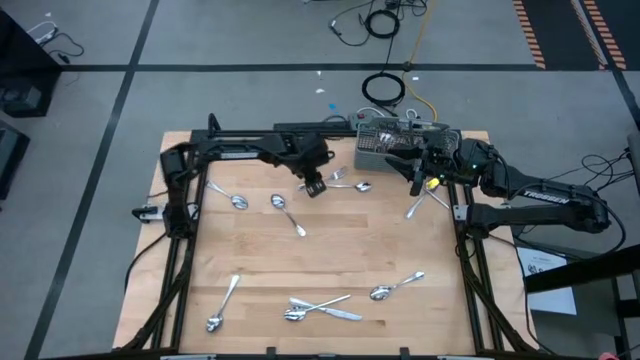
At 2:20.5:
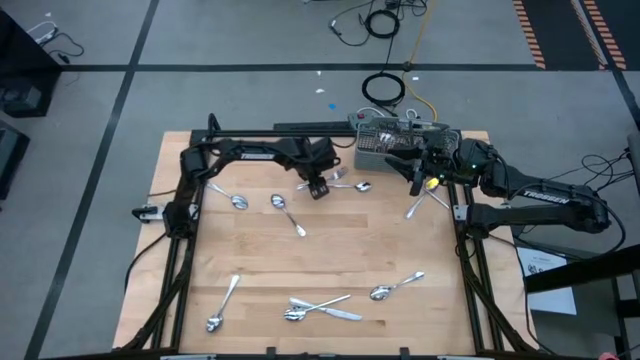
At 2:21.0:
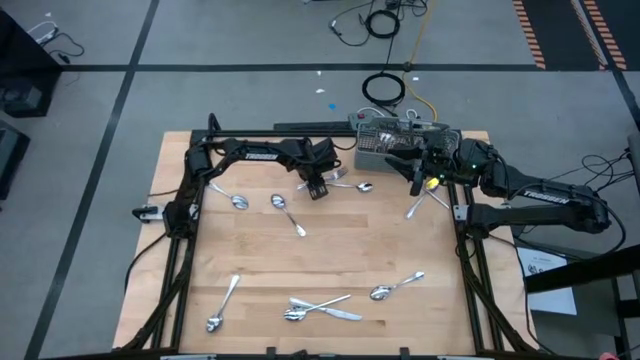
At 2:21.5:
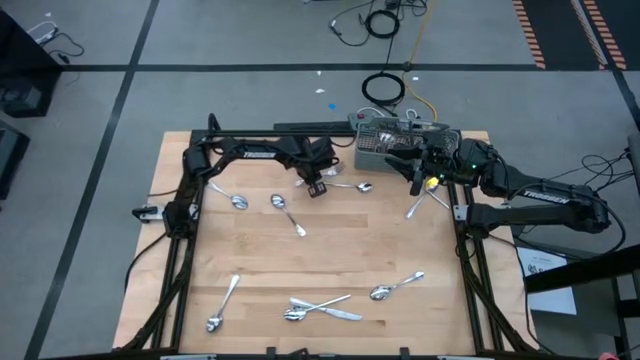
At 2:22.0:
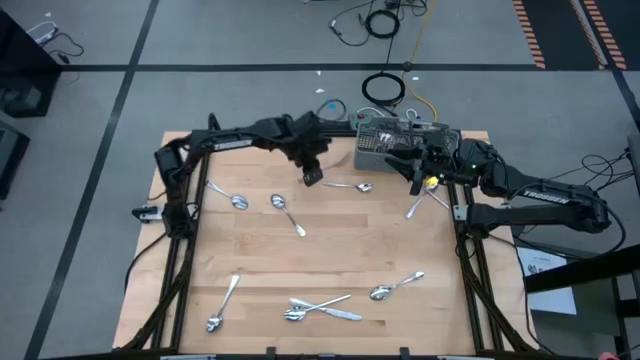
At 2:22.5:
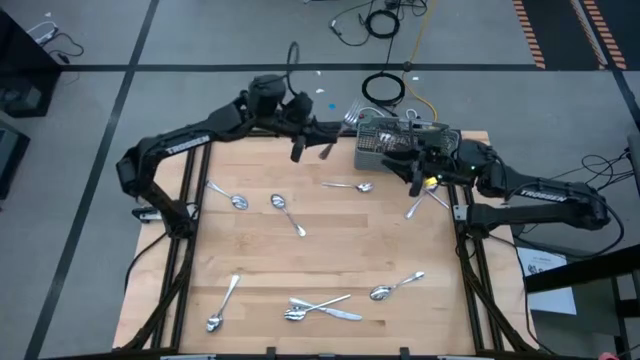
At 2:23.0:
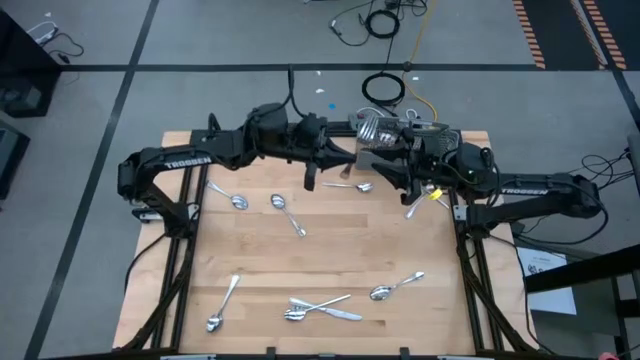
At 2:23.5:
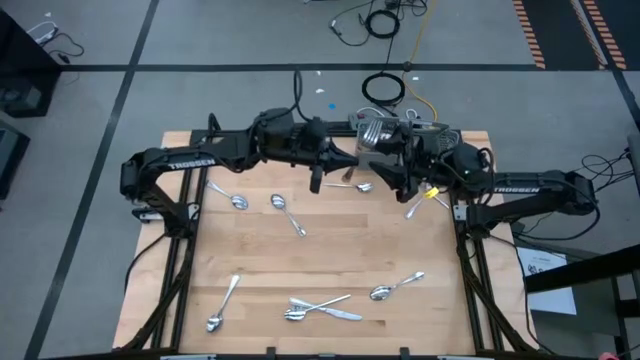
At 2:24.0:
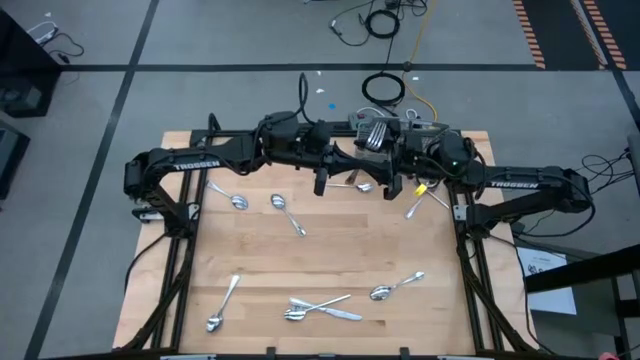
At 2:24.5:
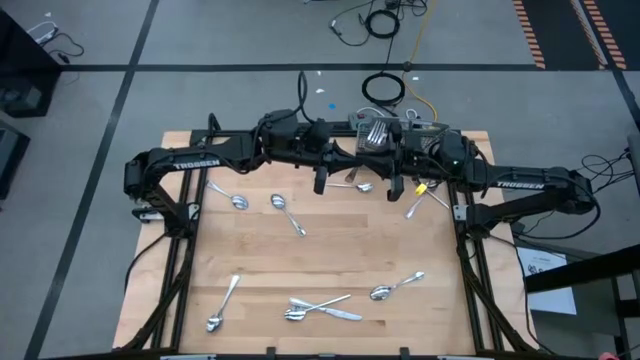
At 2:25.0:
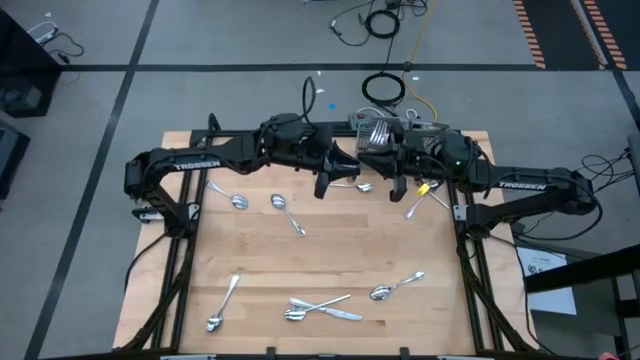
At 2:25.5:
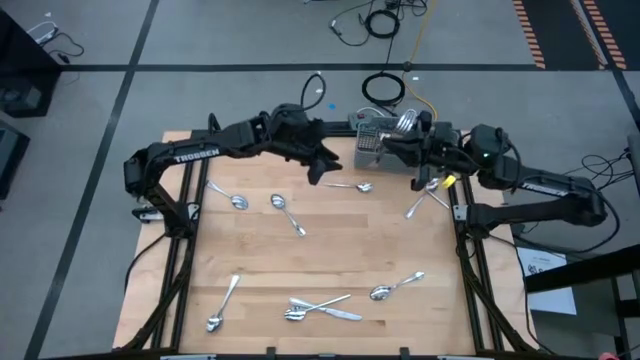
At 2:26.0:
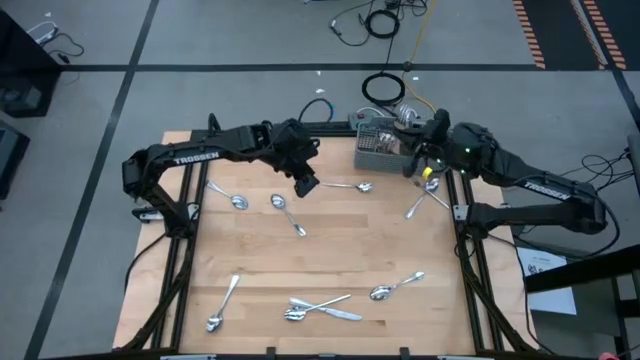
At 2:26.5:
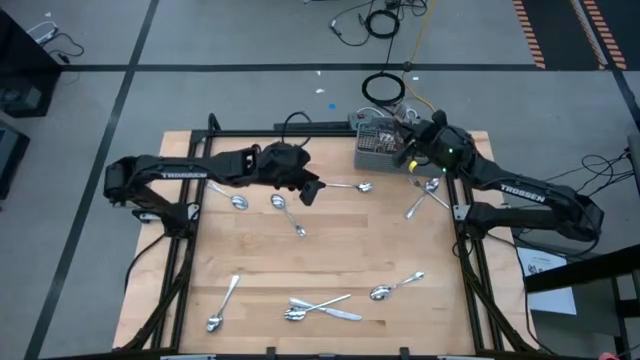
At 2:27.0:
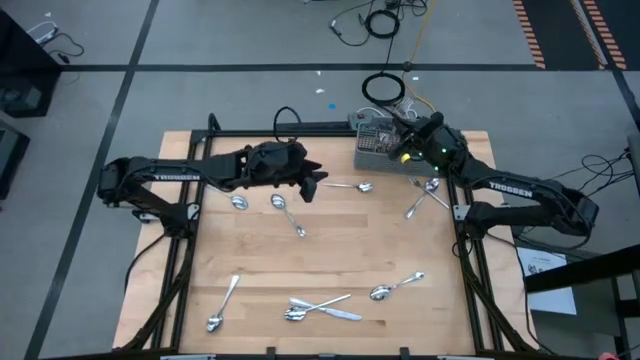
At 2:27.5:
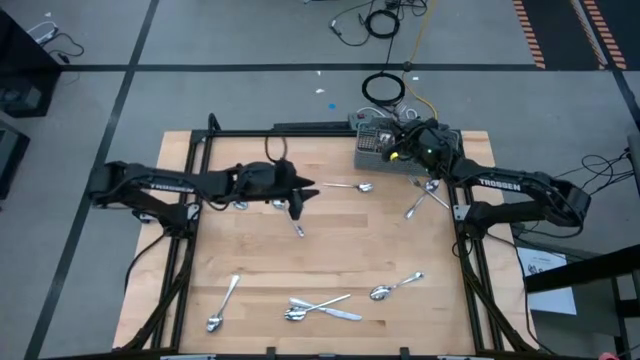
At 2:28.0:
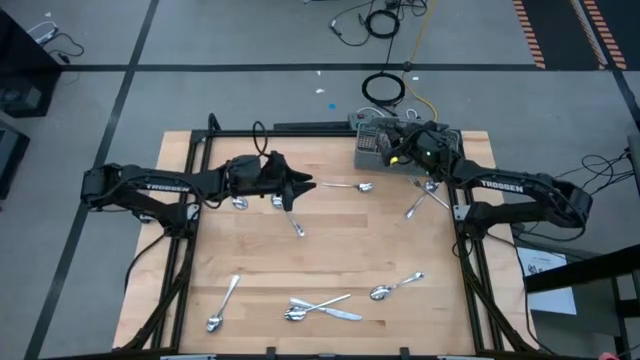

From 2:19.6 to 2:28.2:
Task: Sort silverware
Put the silver fork into the gray utensil holder

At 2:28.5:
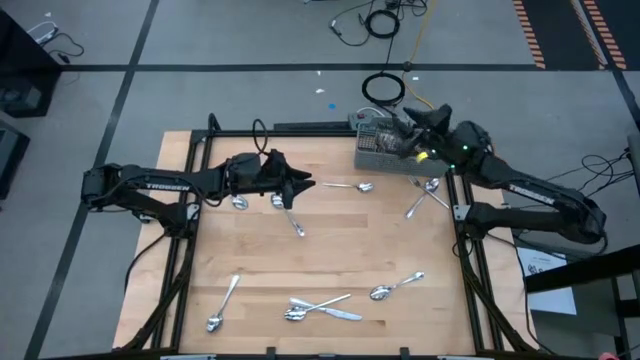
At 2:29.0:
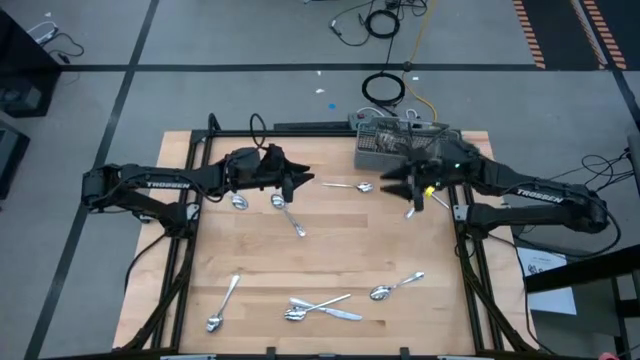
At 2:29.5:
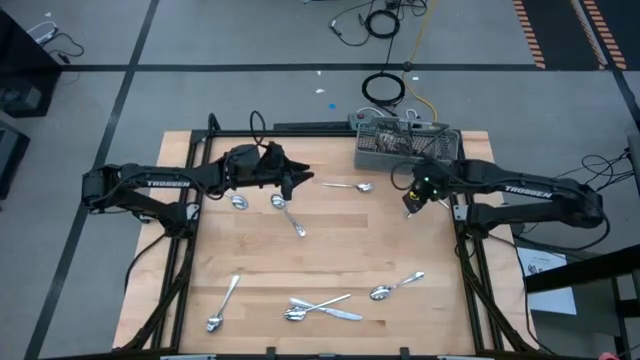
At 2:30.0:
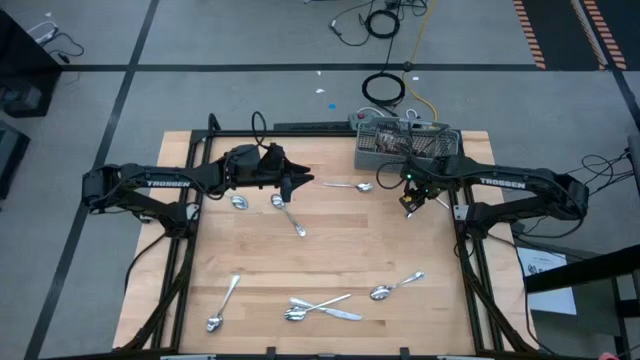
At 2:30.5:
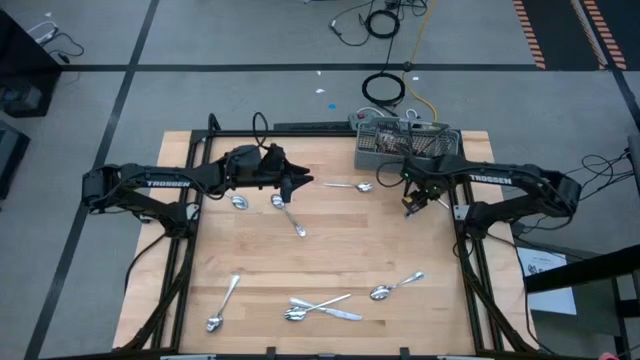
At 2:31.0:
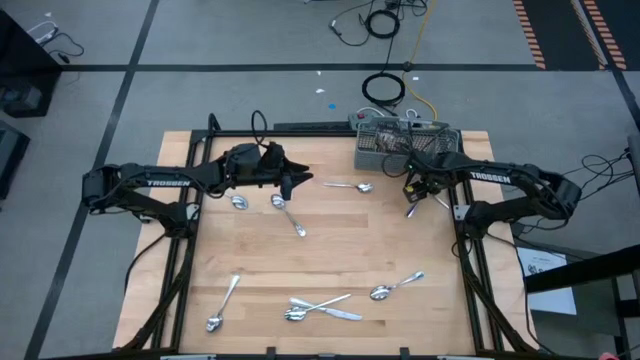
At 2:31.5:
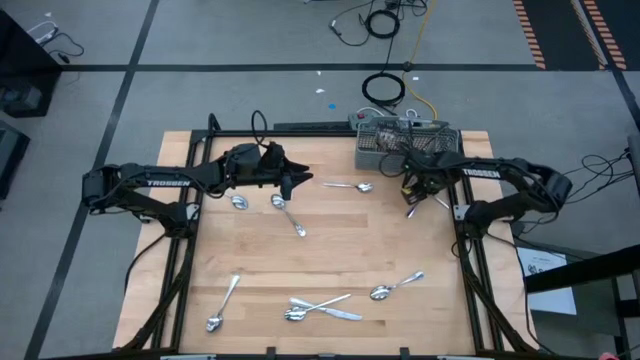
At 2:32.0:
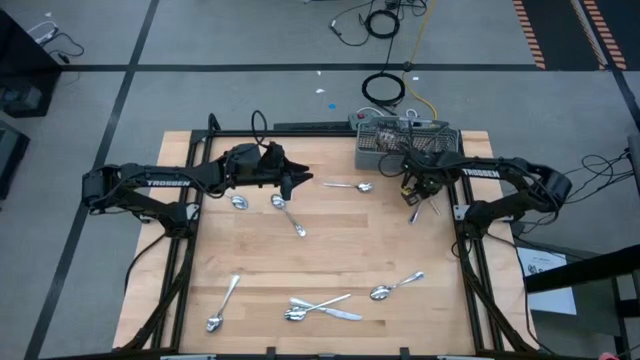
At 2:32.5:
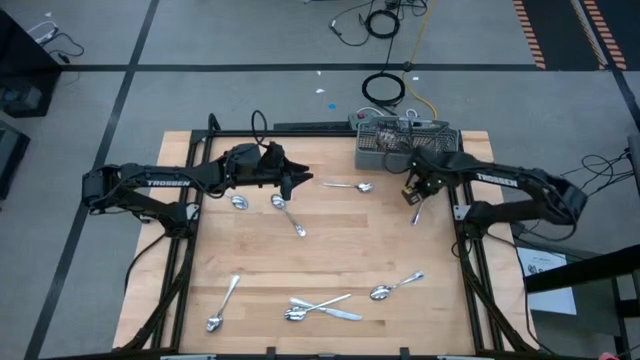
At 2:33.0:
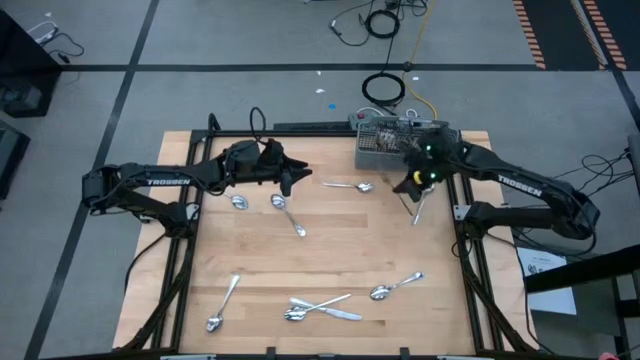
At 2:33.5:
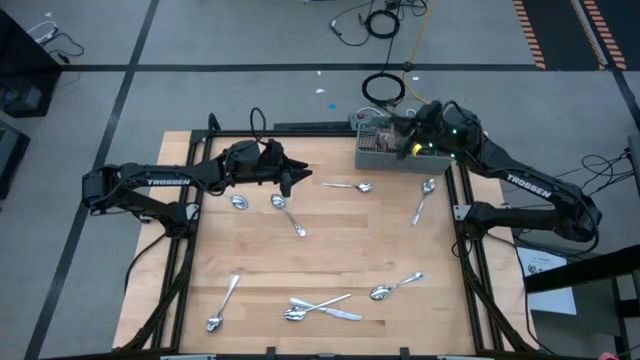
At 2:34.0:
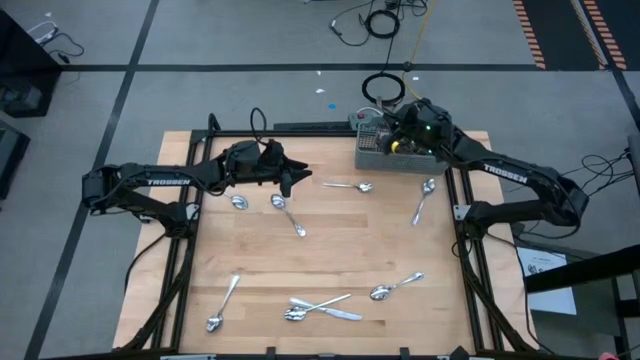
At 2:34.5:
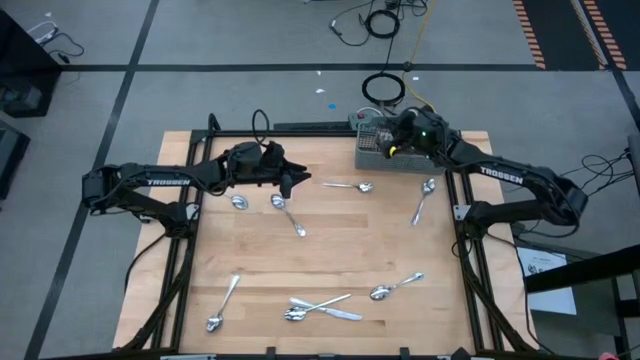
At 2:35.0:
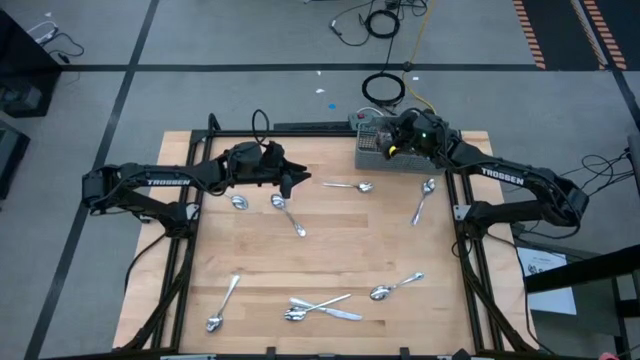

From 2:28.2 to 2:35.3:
Put the silver fork into the gray utensil holder

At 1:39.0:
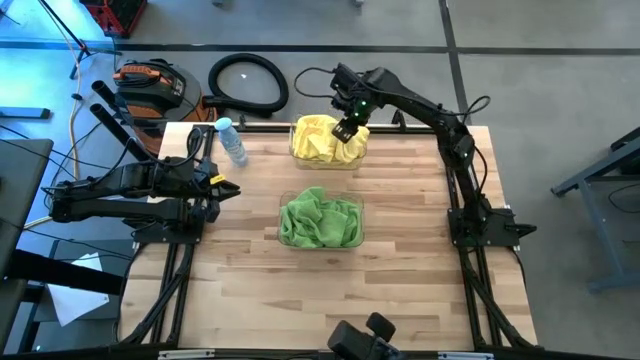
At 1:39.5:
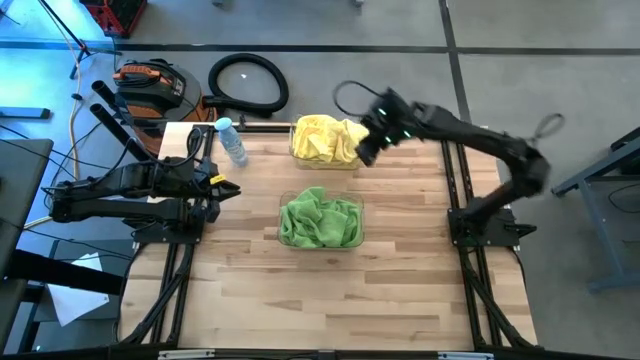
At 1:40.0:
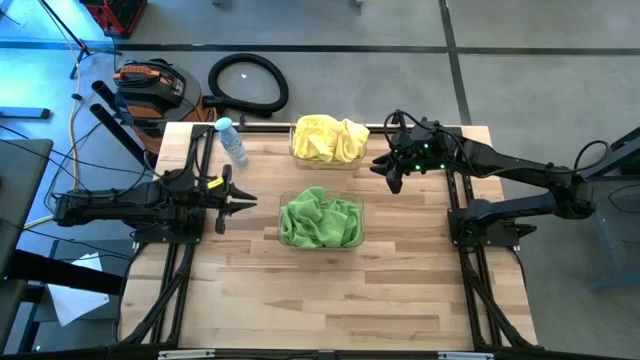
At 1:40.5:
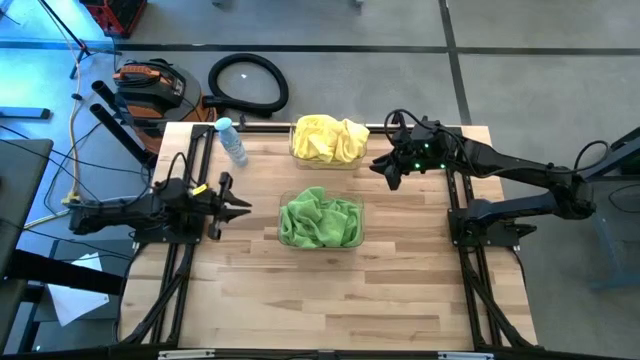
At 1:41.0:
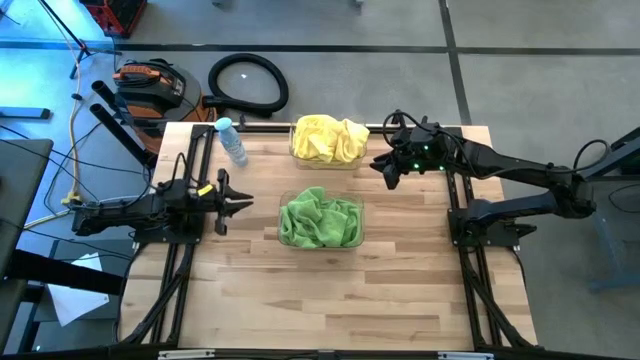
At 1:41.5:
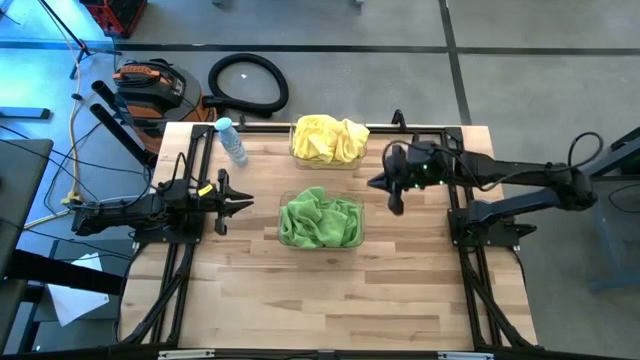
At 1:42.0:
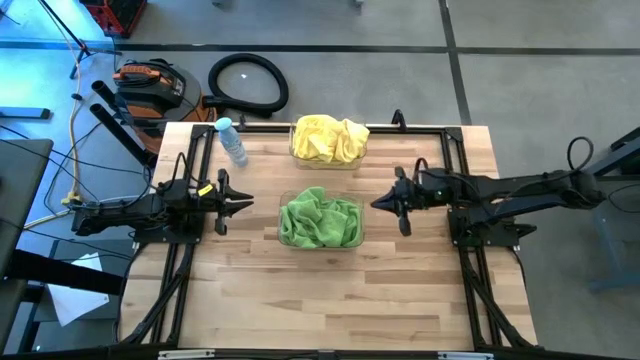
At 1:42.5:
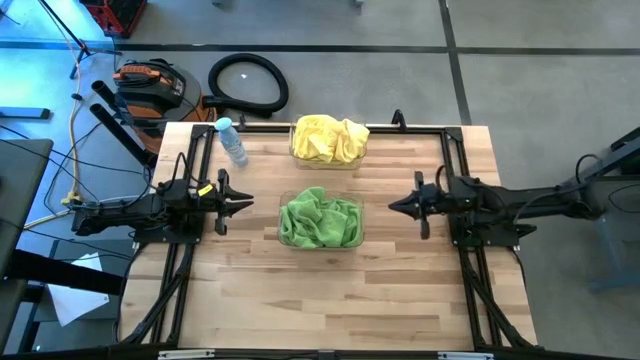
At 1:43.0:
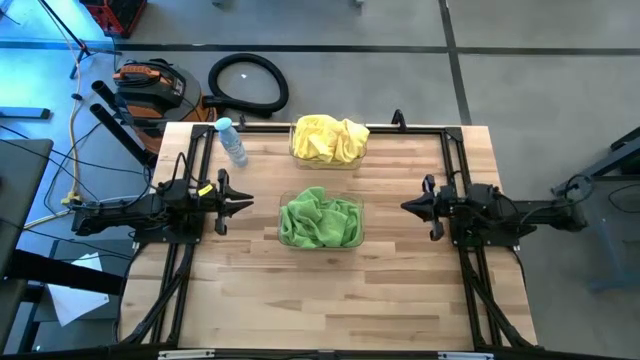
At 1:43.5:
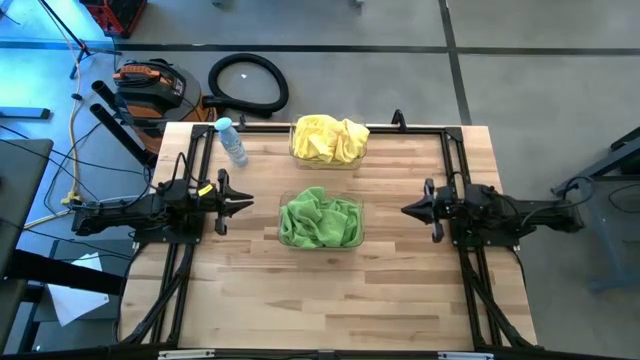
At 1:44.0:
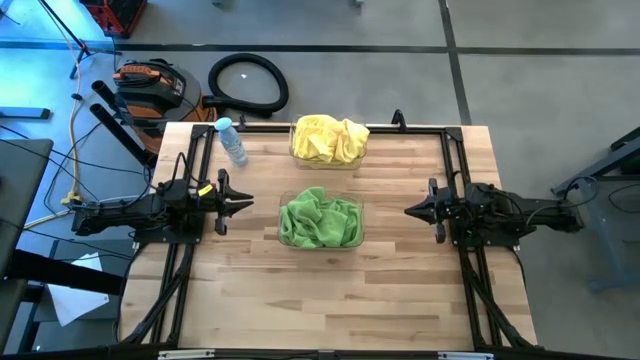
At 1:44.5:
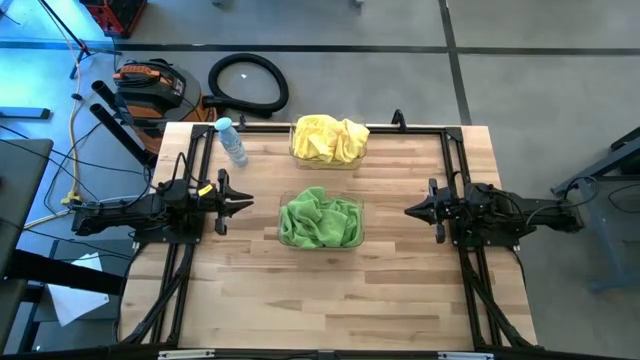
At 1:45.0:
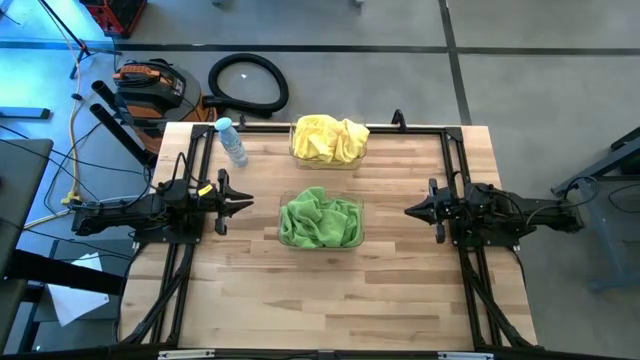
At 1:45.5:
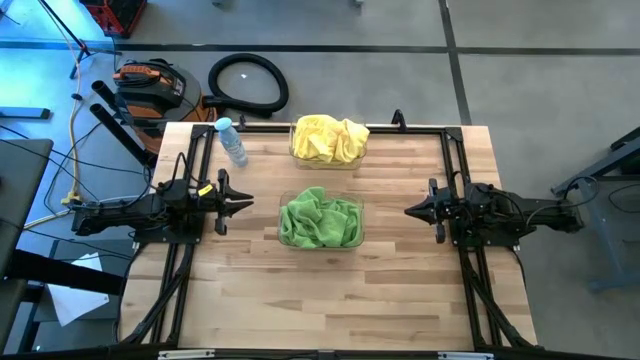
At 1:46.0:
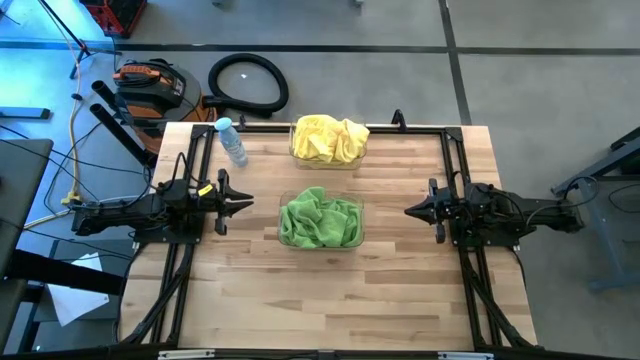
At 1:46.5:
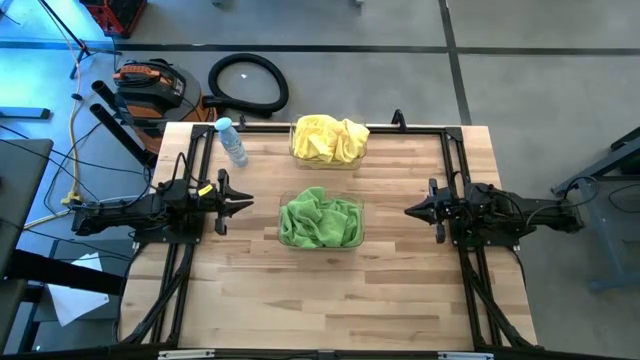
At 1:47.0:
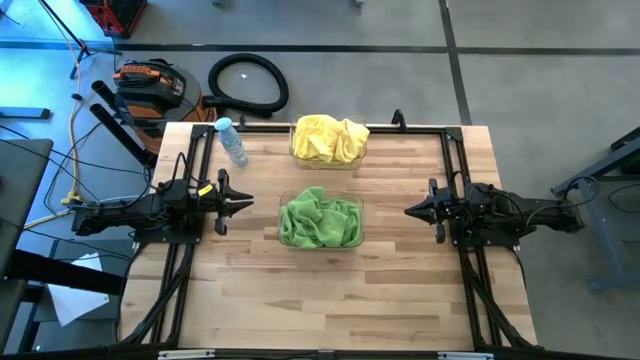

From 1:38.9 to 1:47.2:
Task: Sort microfiber towel by color & place in baskets
Return to Home Position
